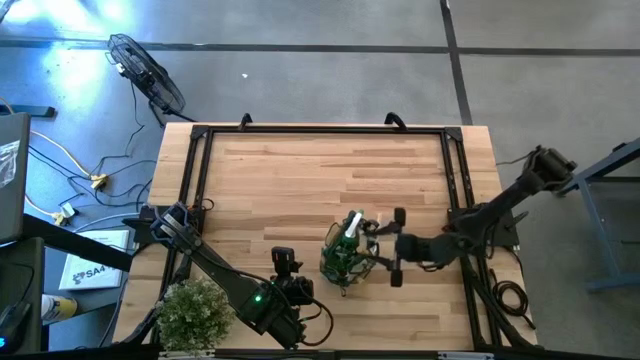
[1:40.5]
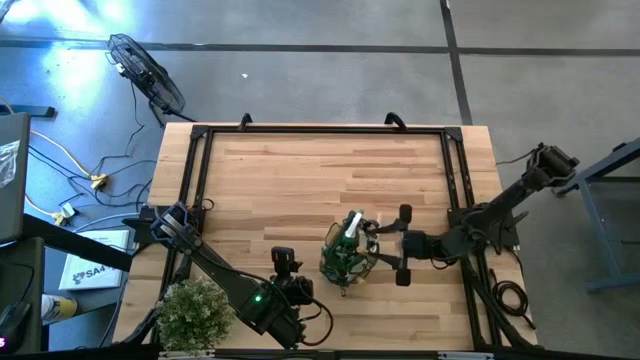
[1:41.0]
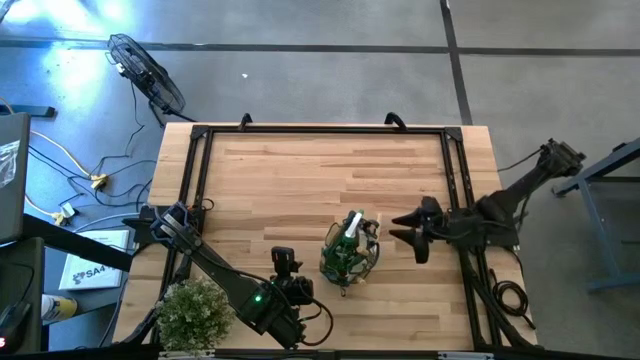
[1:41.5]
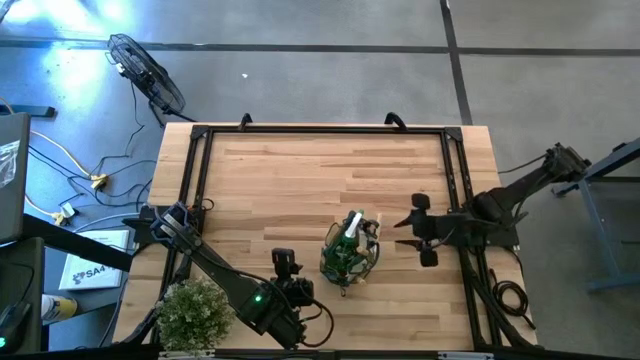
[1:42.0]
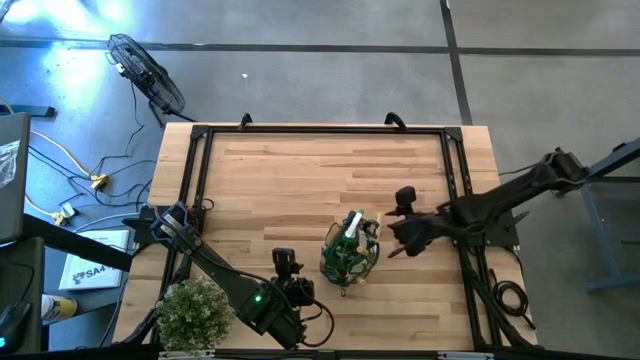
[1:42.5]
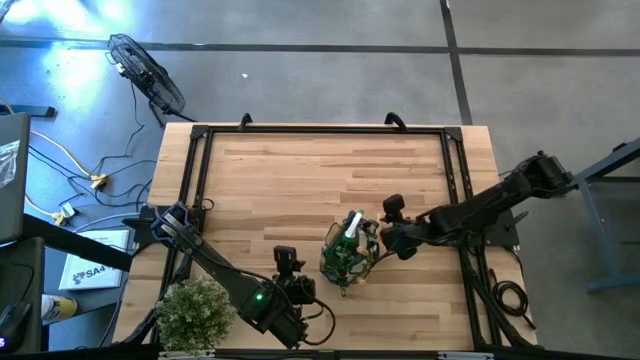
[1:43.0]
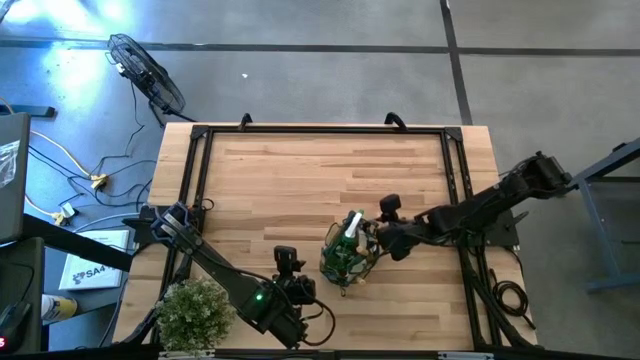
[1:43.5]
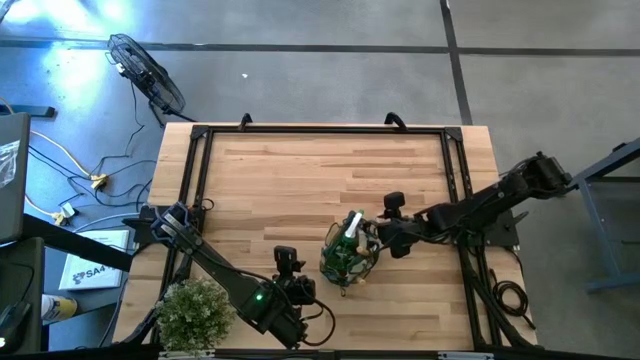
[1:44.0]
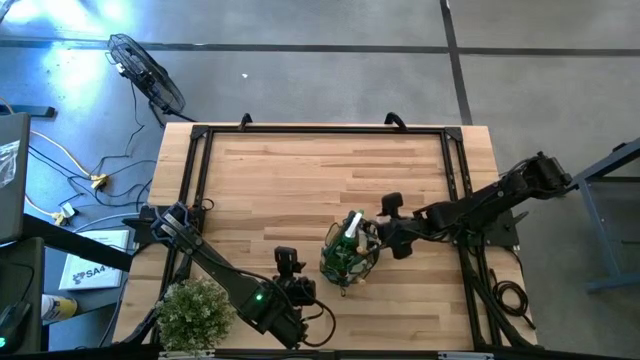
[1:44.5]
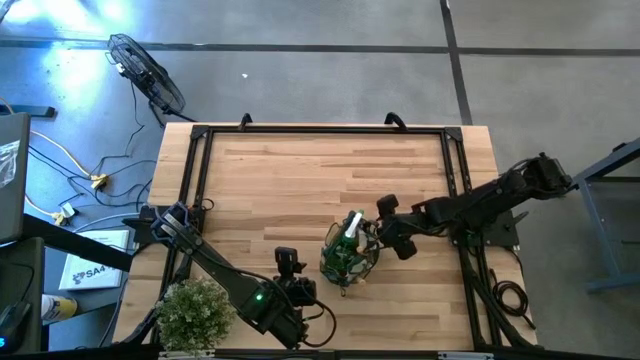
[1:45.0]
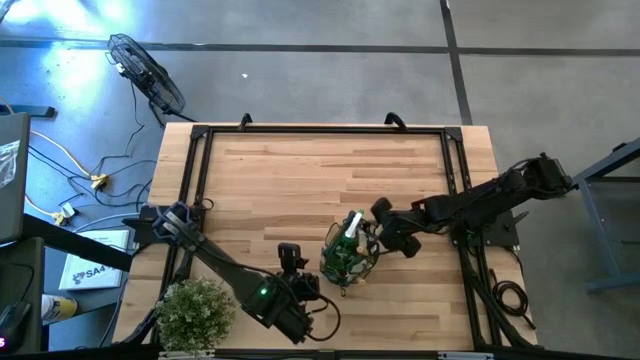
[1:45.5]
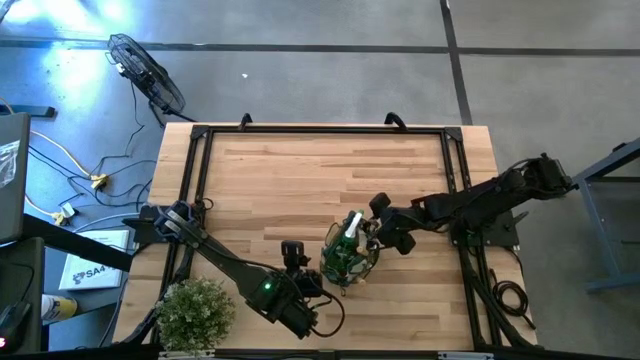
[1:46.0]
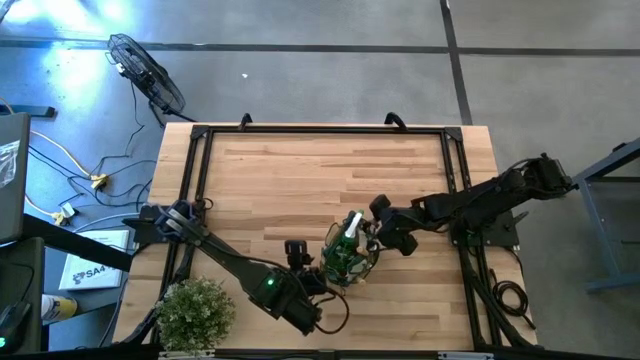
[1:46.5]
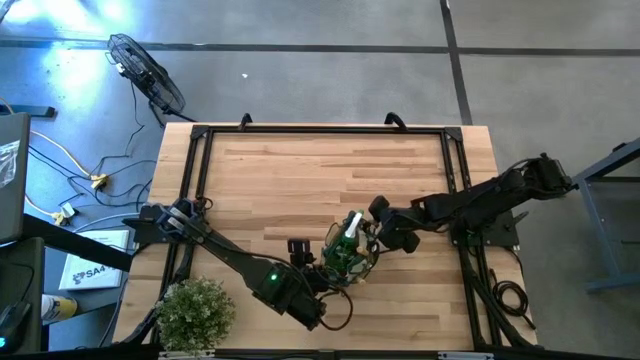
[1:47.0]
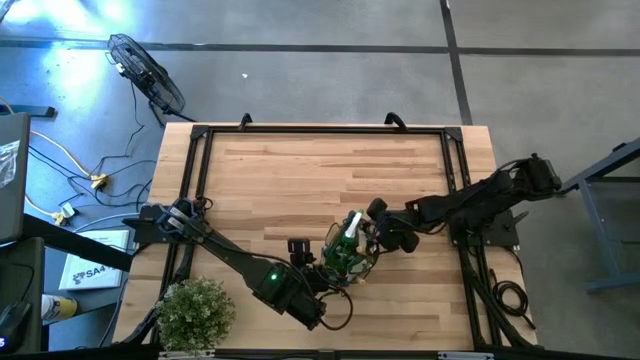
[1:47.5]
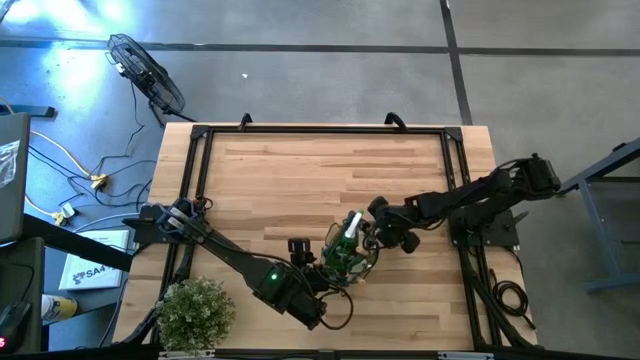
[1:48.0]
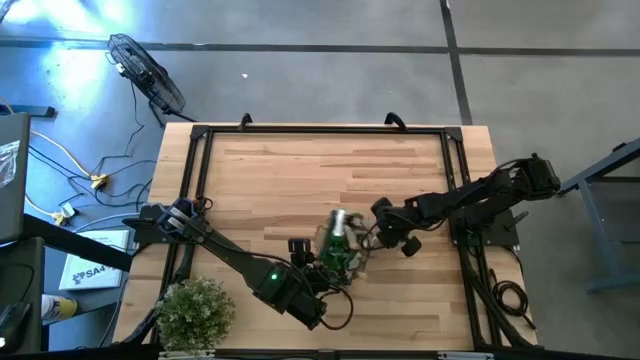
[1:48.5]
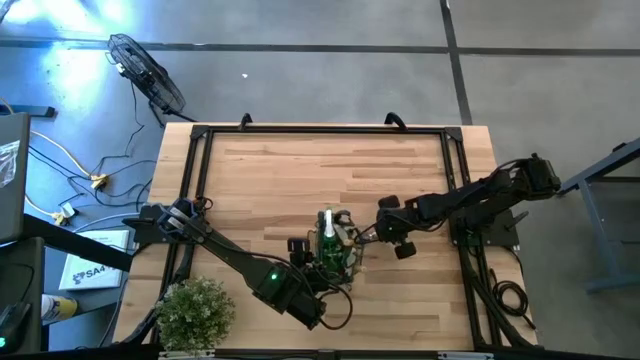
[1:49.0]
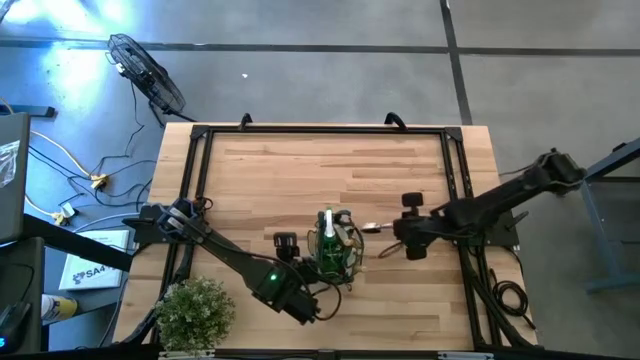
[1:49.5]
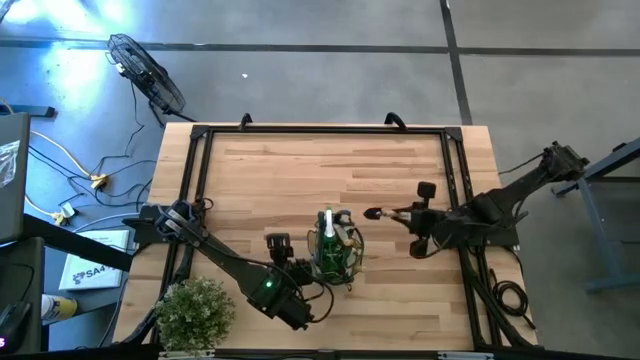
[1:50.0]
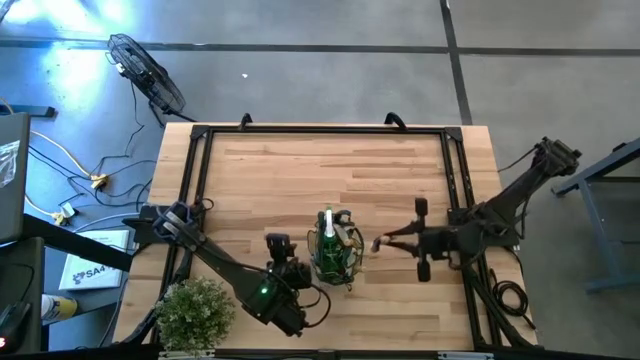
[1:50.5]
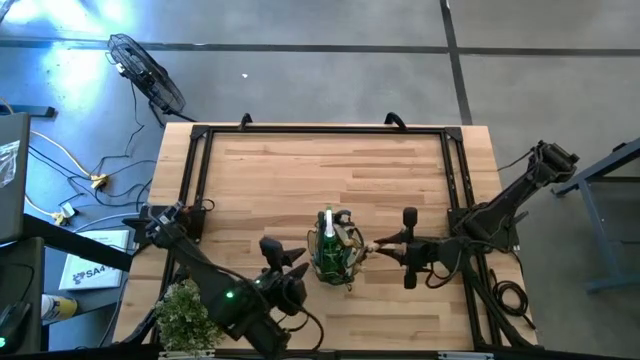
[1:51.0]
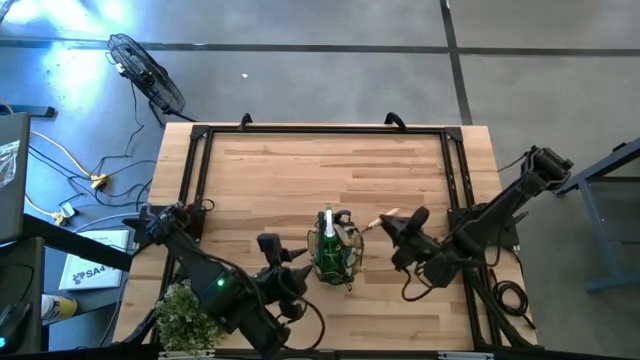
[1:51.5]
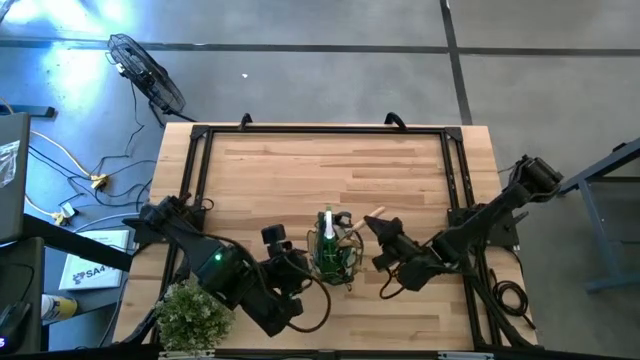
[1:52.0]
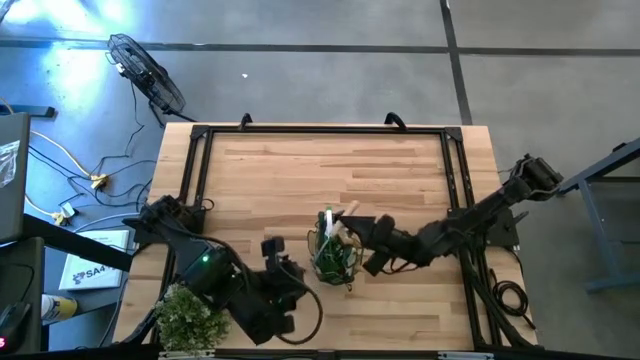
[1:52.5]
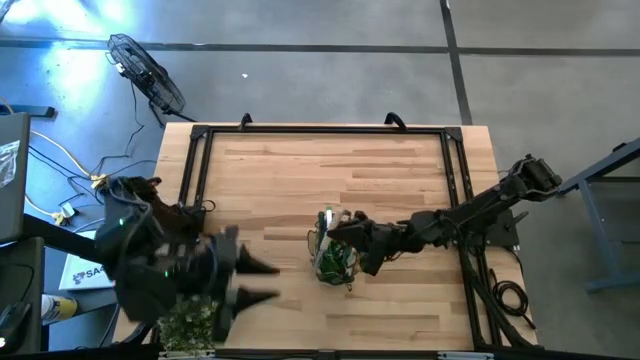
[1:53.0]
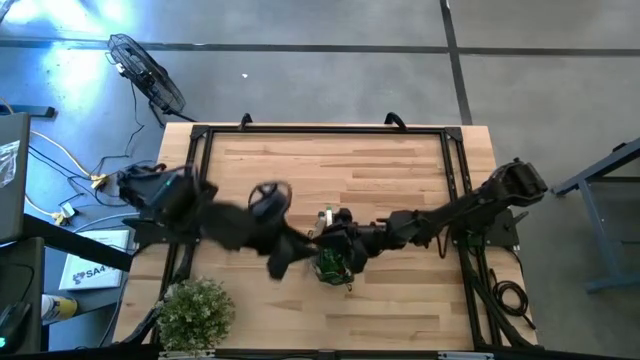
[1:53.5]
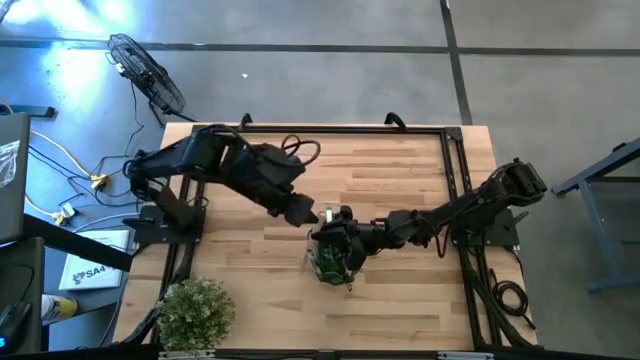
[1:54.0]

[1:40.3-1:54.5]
Task: Pick & Place Garden tools in Gardening bag
Put the trowel into the gardening bag

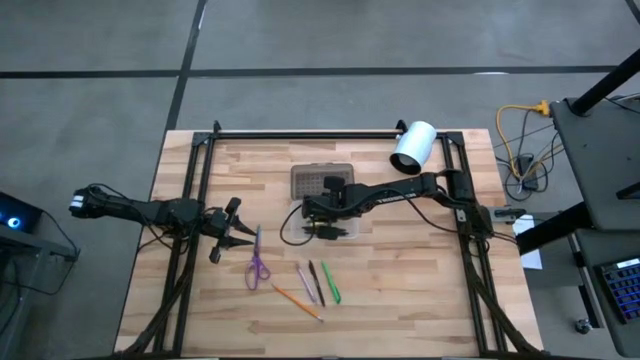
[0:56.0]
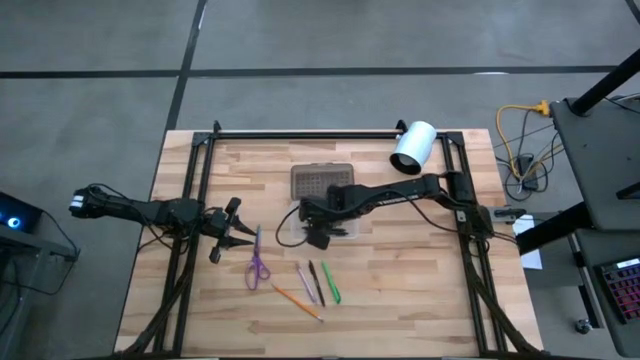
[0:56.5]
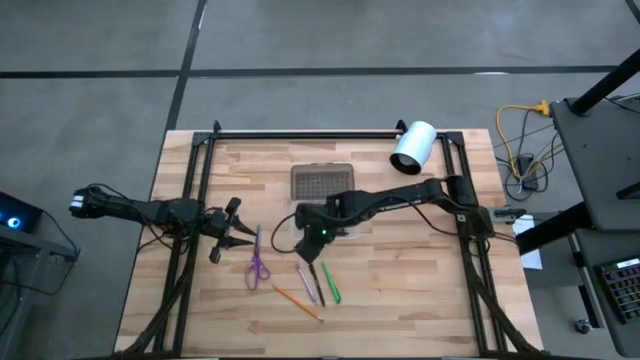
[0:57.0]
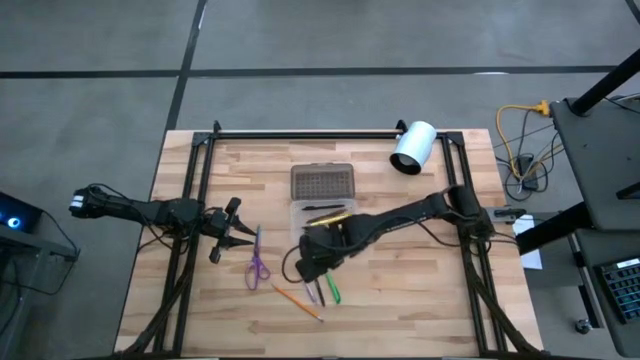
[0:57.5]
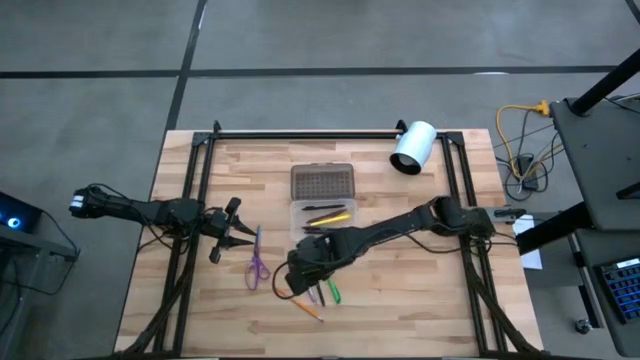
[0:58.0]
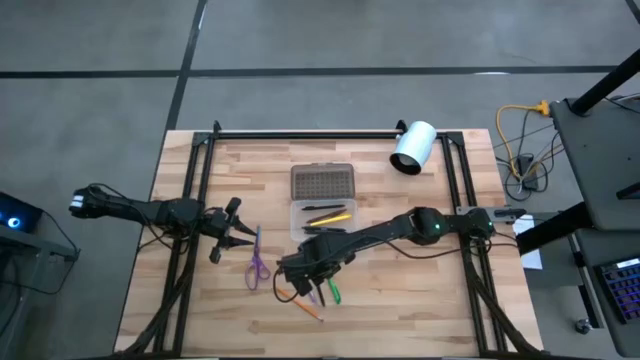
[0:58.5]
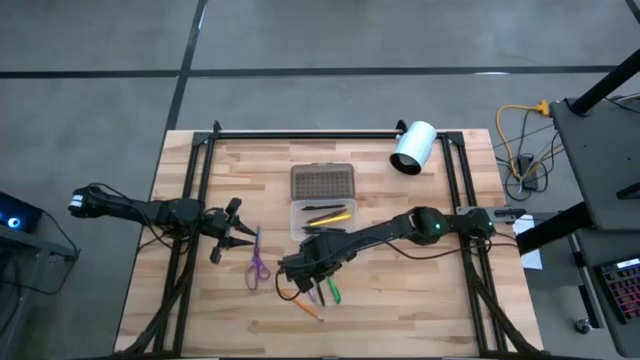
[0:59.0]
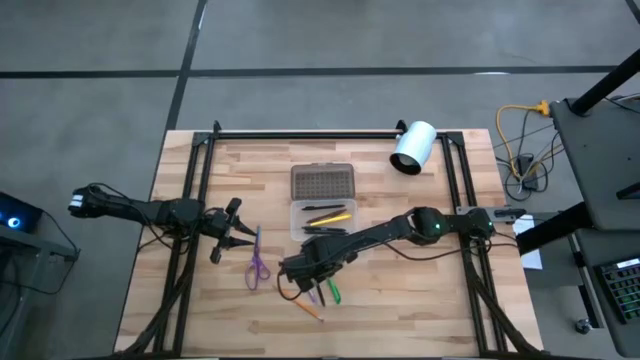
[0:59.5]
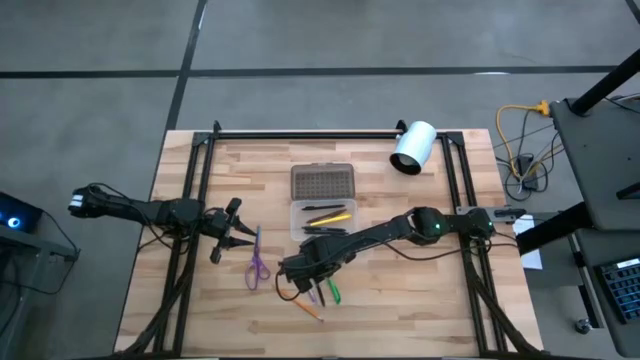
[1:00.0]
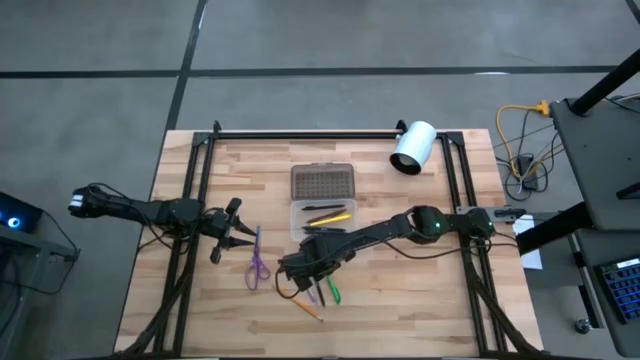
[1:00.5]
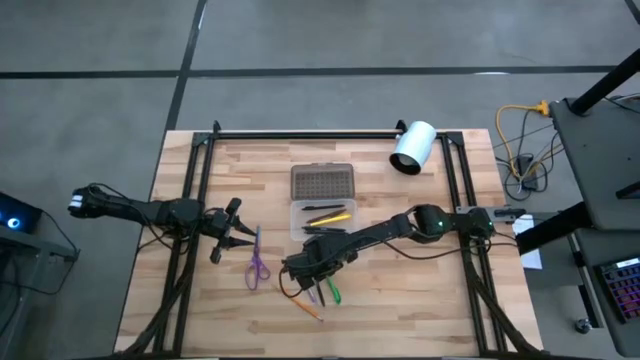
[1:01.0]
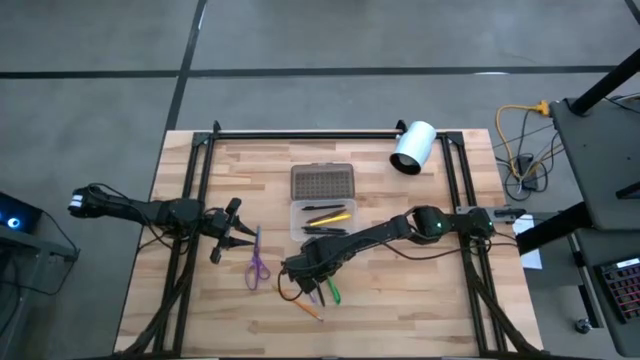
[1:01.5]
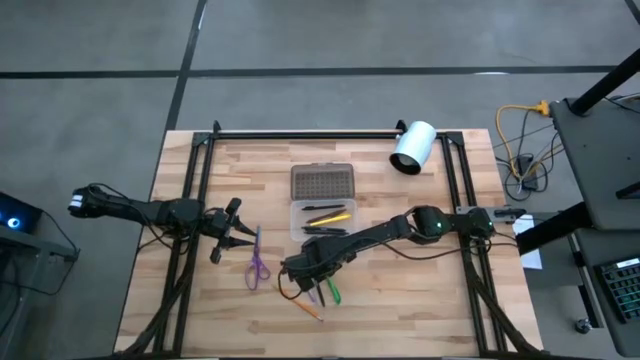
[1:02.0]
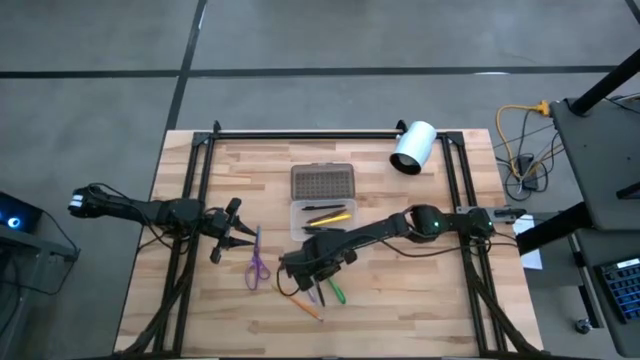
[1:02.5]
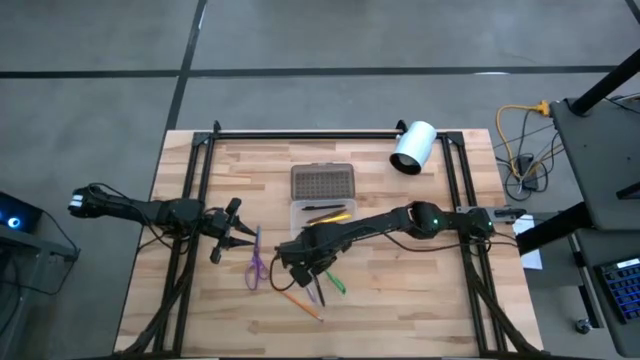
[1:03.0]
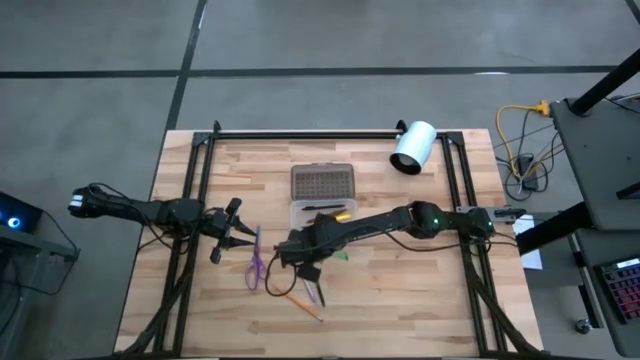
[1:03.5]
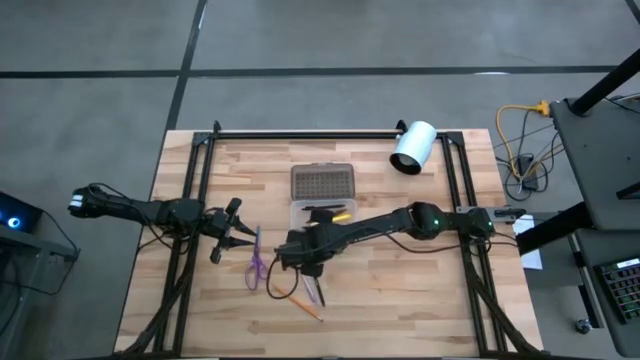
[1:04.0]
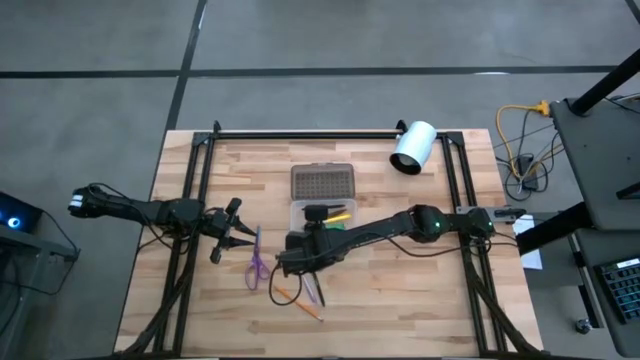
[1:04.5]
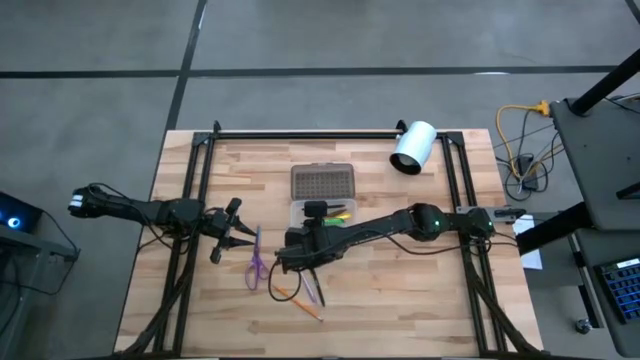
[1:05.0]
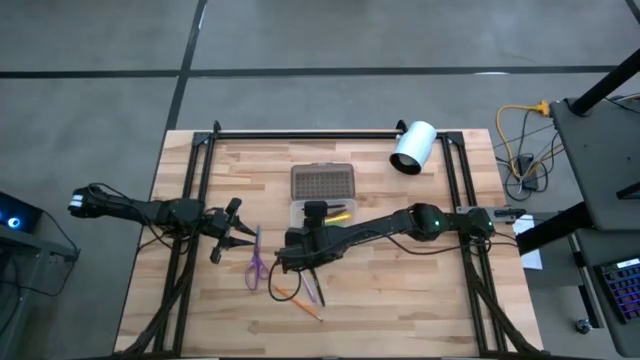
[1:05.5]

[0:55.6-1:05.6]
Task: Pick & place school supplies into a supply box
Put the green pen into the supply box
